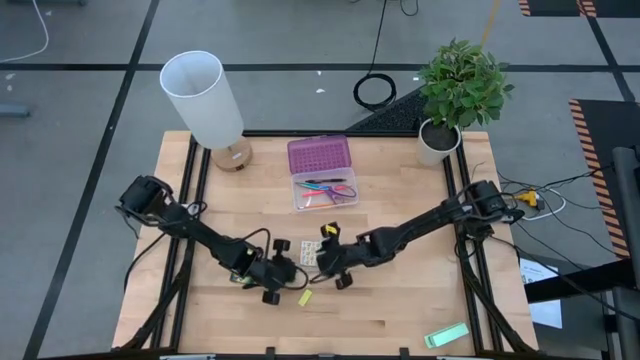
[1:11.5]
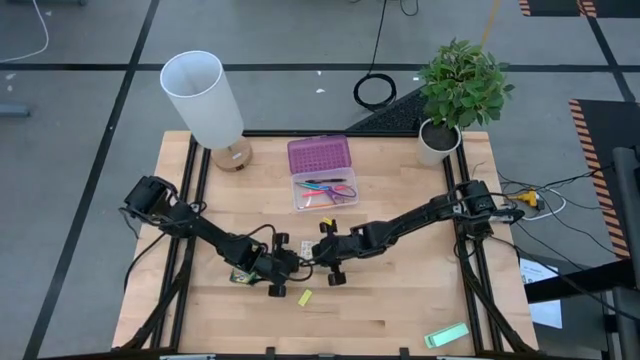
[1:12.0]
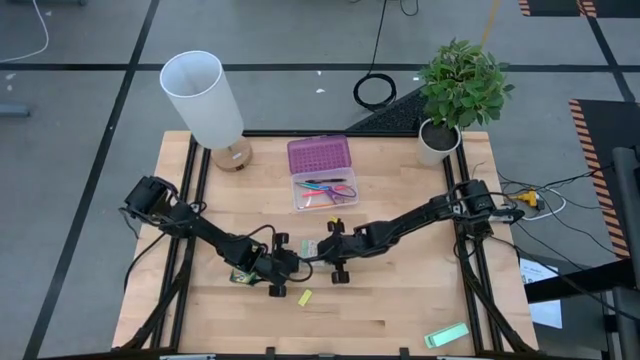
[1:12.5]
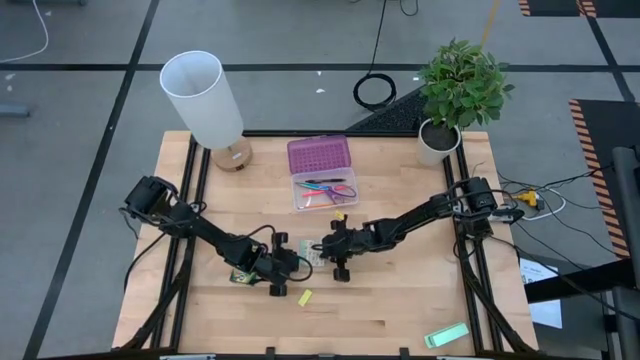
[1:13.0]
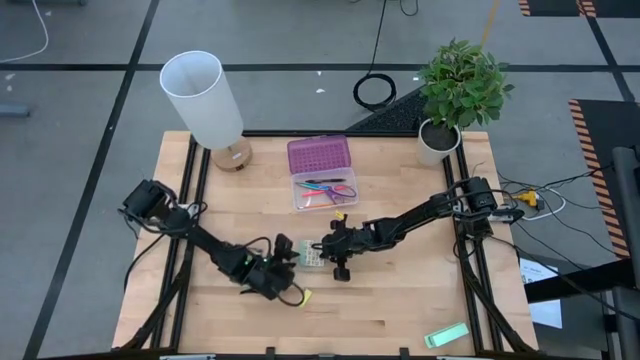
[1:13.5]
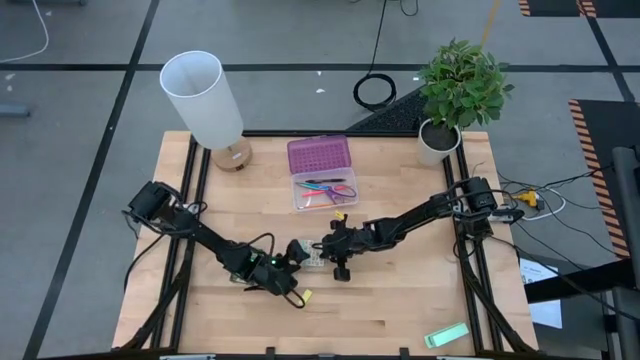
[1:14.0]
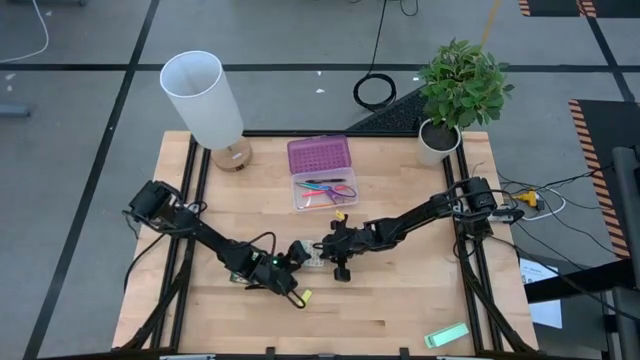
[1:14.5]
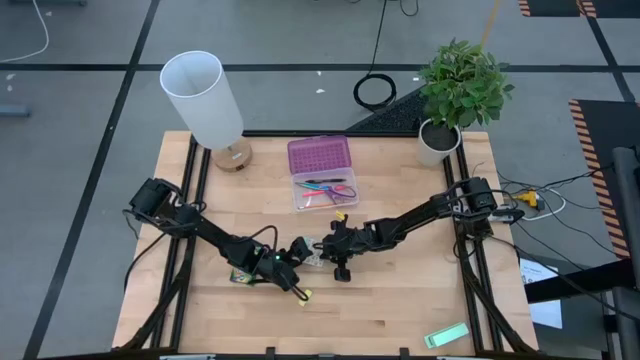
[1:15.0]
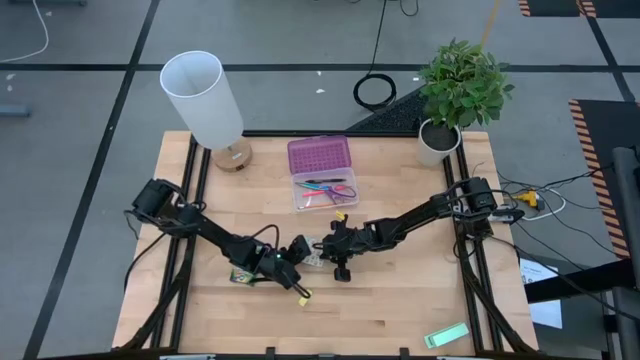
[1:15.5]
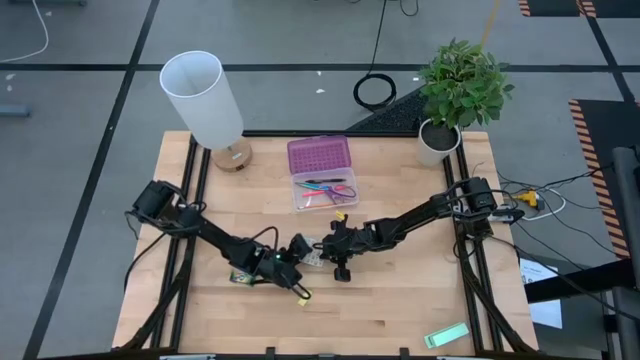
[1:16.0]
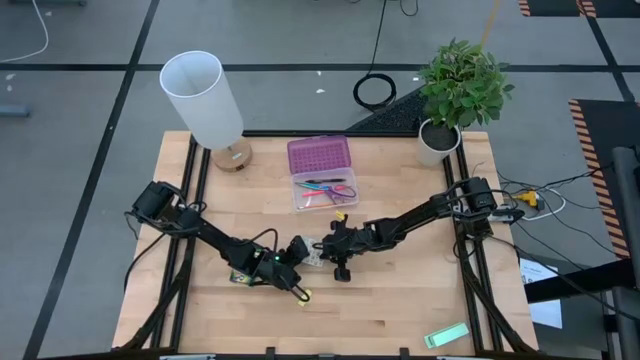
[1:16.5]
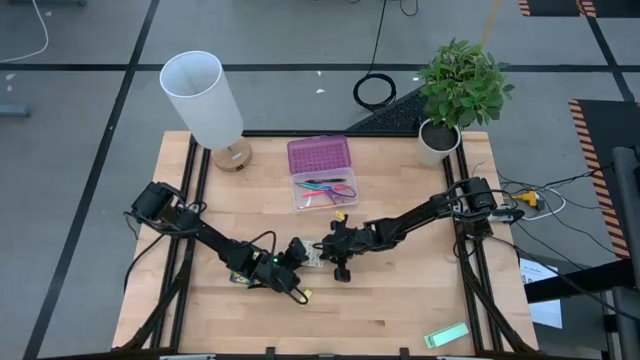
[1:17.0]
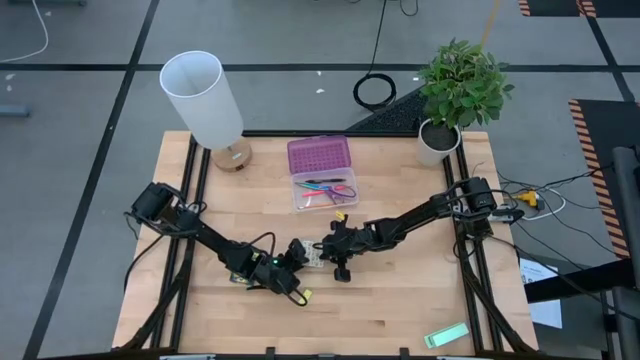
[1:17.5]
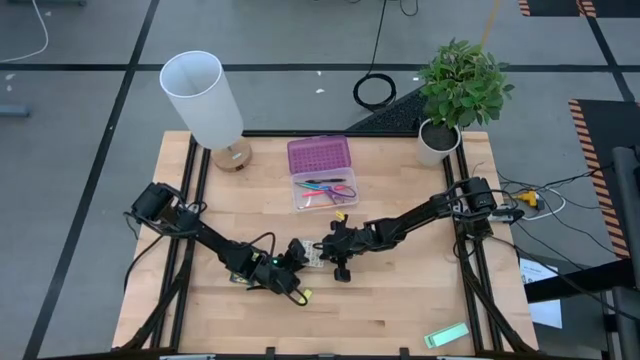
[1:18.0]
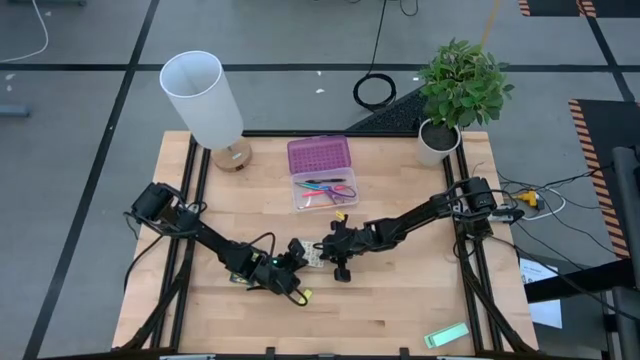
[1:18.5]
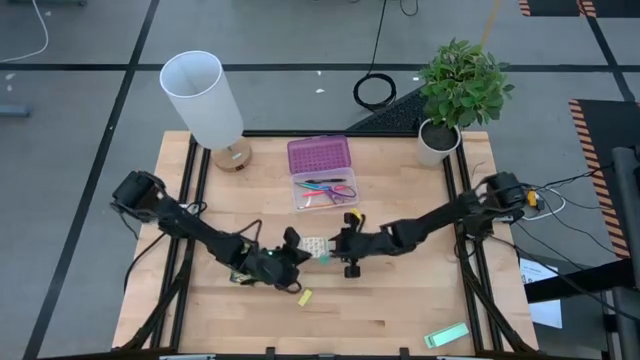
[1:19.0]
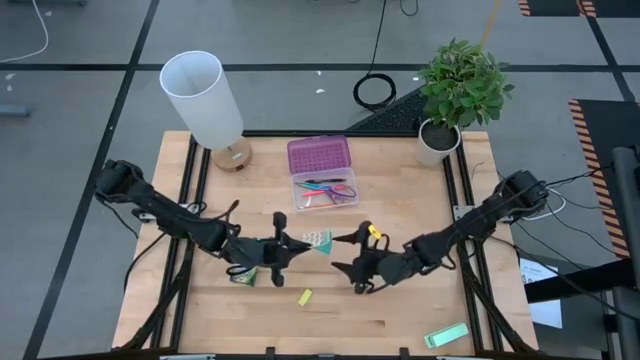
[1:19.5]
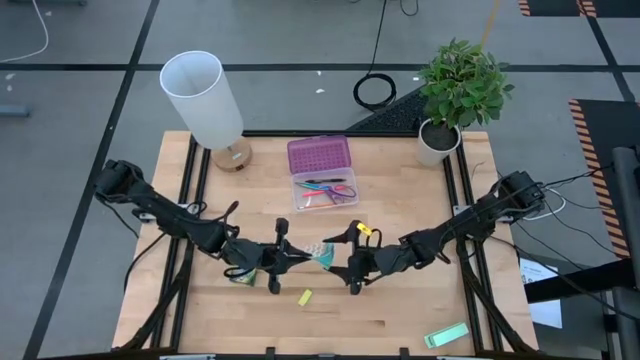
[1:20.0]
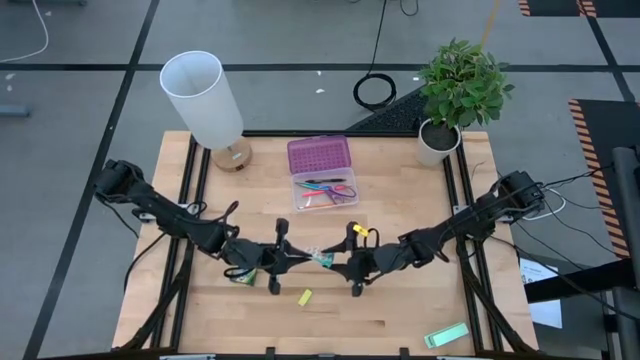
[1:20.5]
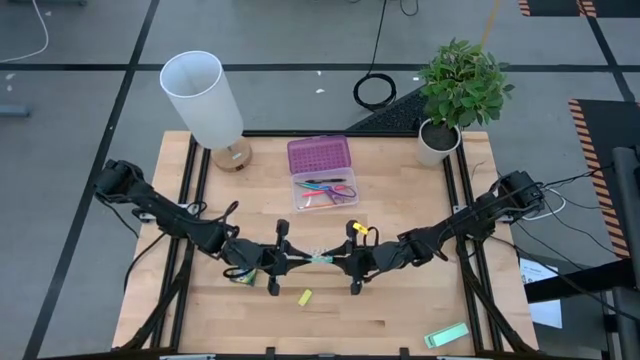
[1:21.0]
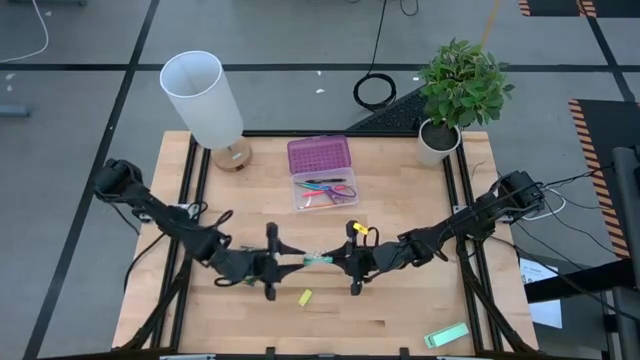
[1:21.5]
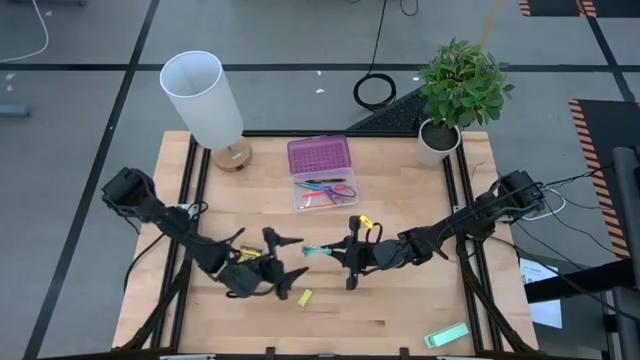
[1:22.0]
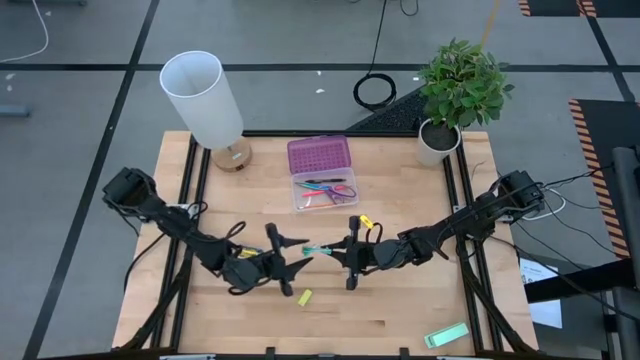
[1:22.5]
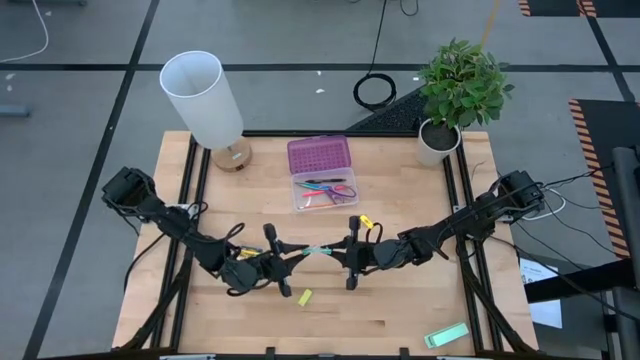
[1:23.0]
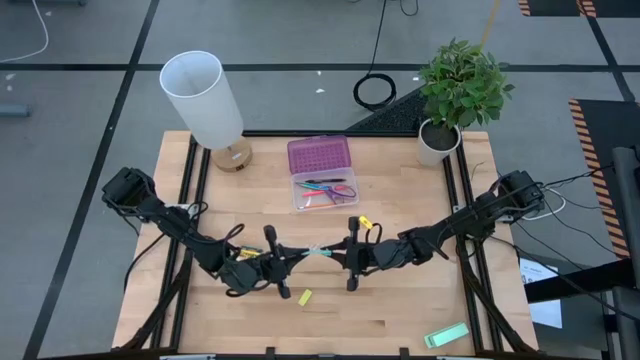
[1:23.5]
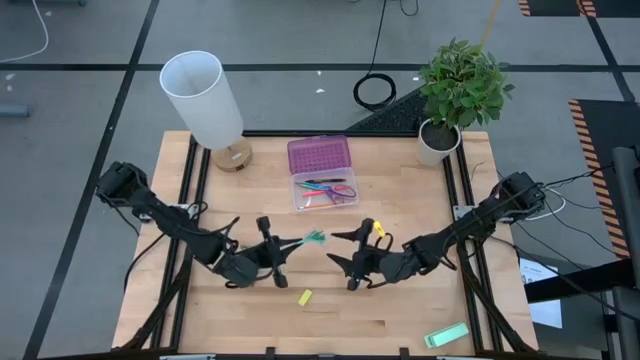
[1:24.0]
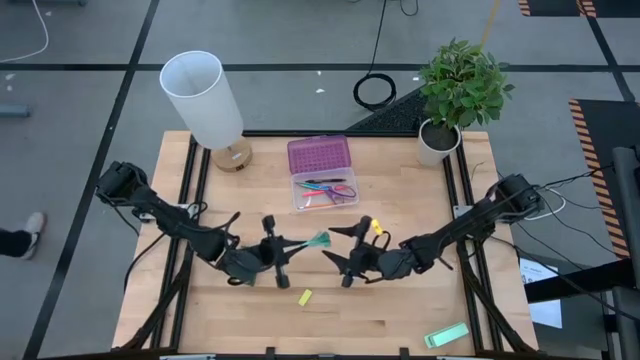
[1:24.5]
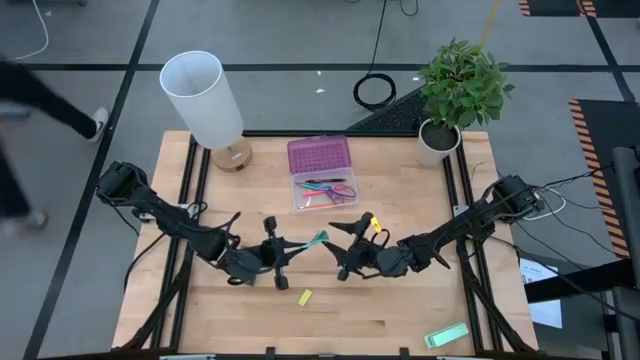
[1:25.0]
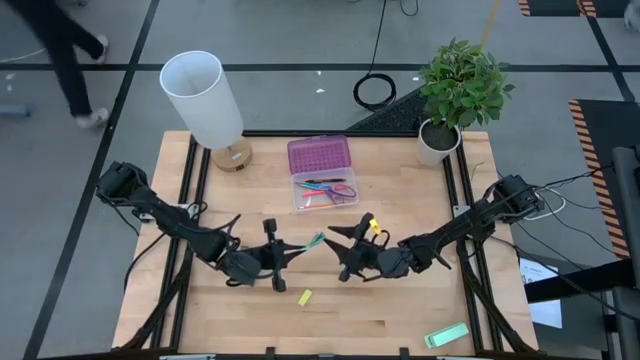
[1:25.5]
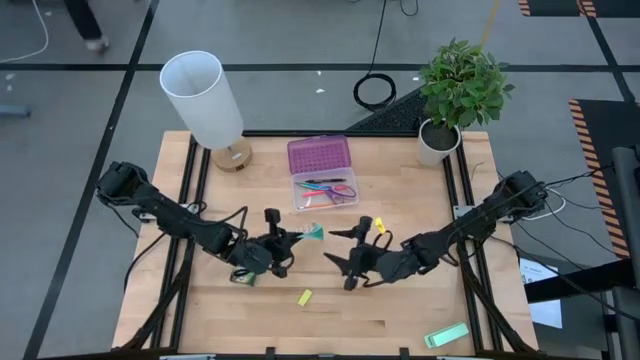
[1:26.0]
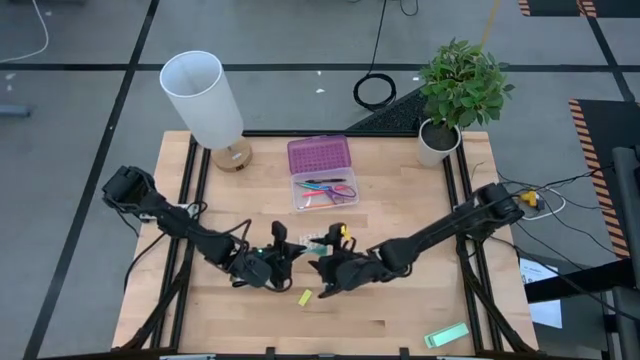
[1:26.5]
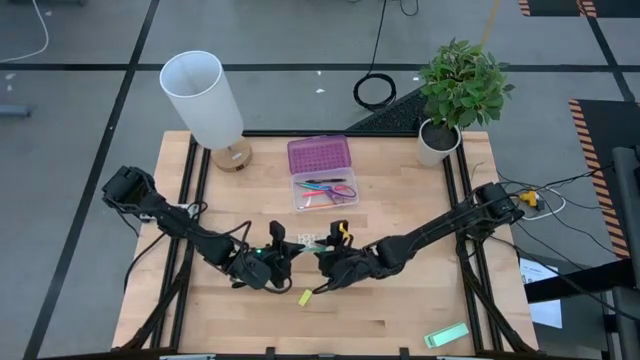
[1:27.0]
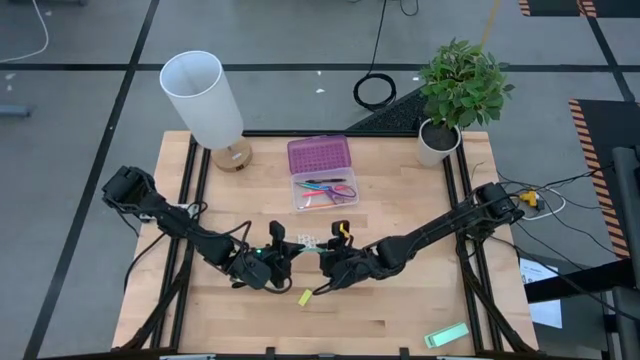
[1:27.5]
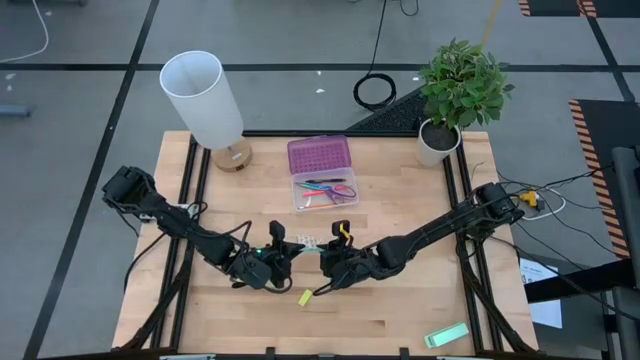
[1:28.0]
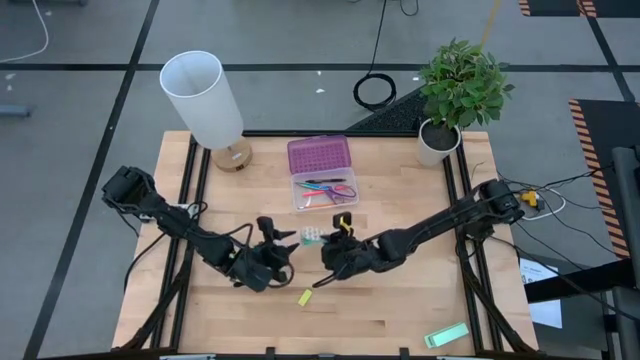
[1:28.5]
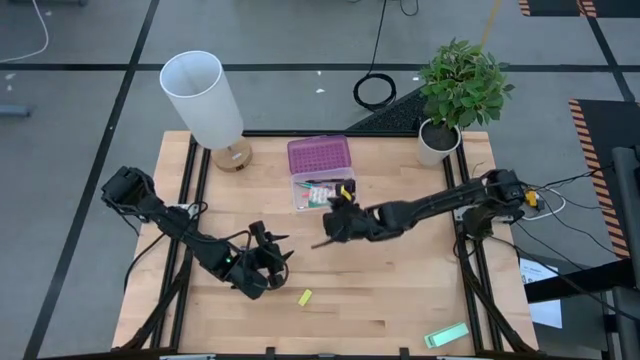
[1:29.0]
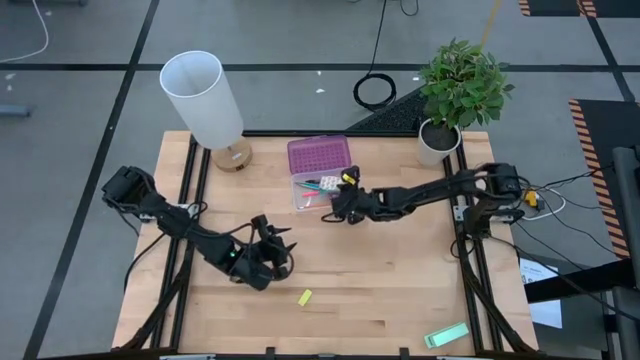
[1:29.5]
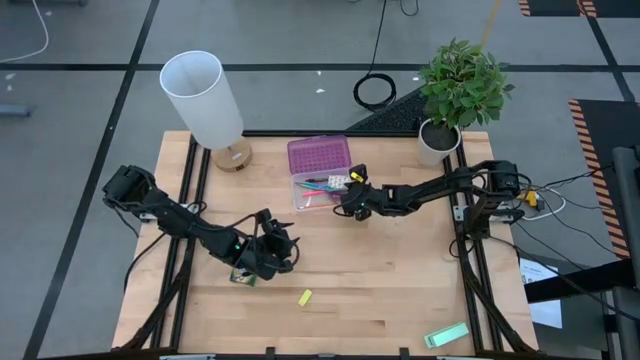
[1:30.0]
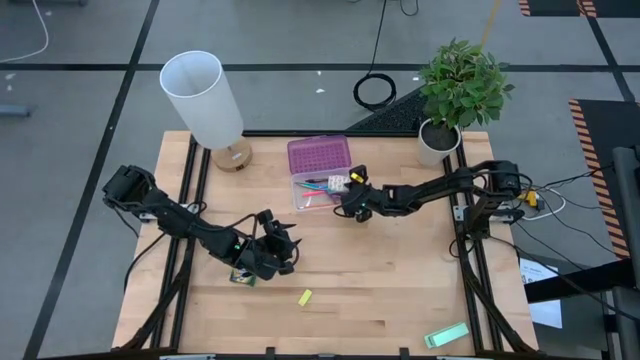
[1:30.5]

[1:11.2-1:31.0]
Task: Pack school essentials
Put the blue sticky notes into the purple supply box

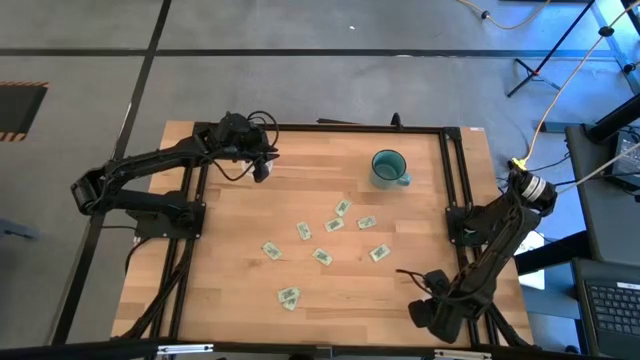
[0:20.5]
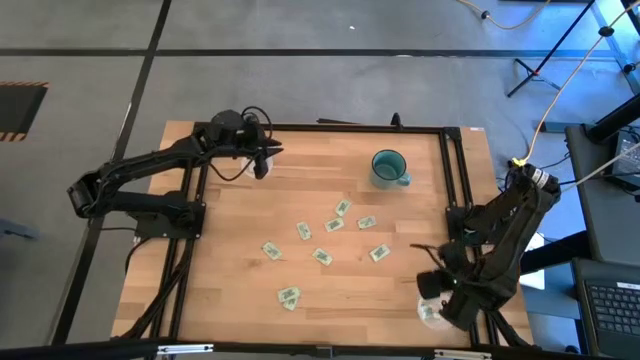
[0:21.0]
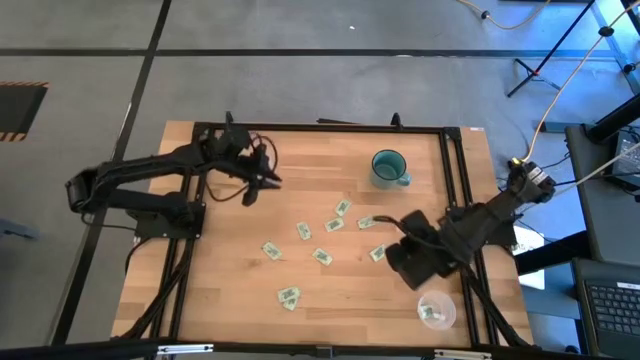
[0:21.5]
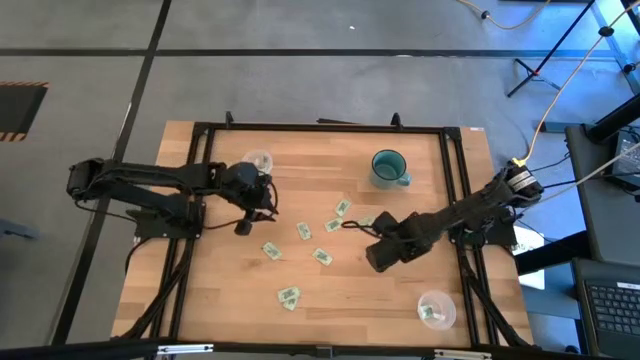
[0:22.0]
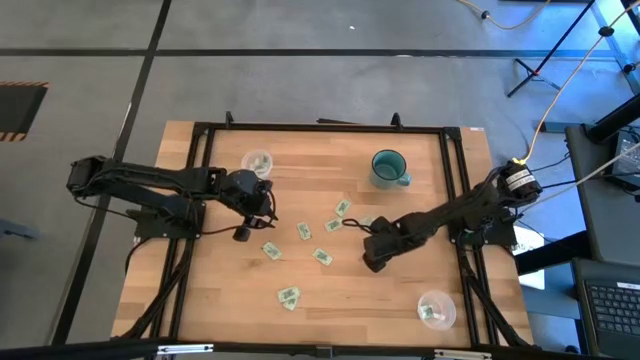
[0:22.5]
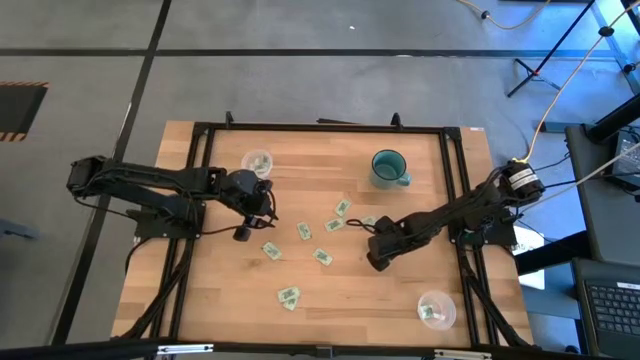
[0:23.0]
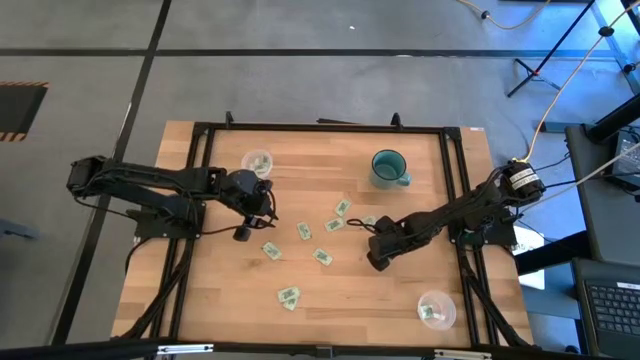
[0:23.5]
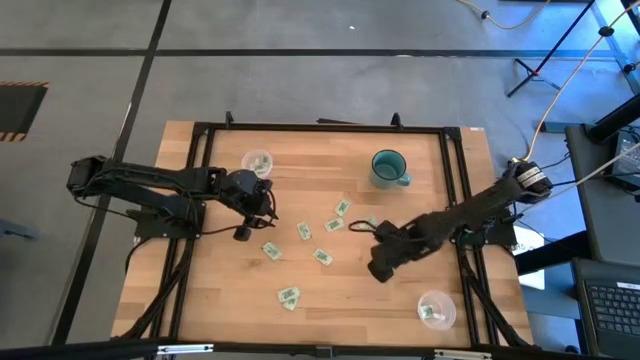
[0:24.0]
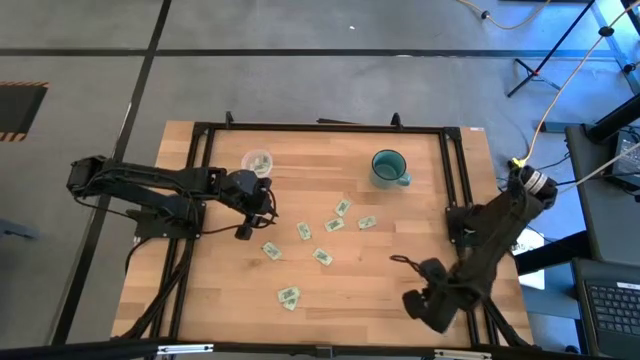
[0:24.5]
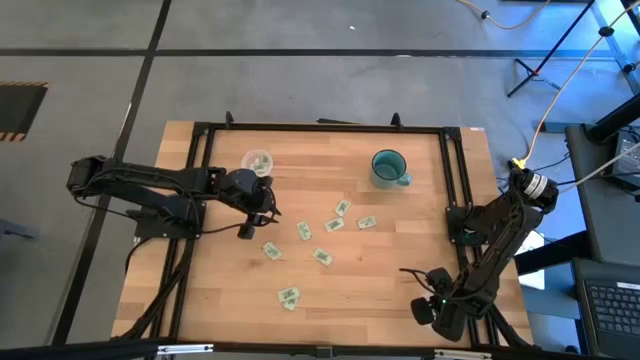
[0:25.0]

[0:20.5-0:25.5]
Task: Pick and place Stevia / Truvia into bins
Put the stevia packet into the bottom transparent container
